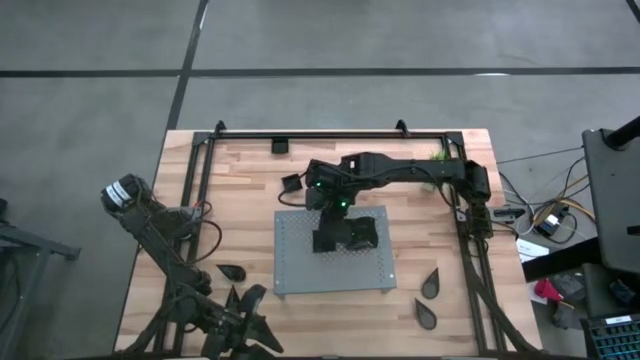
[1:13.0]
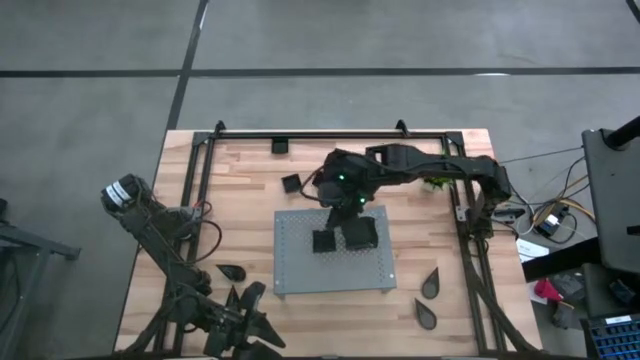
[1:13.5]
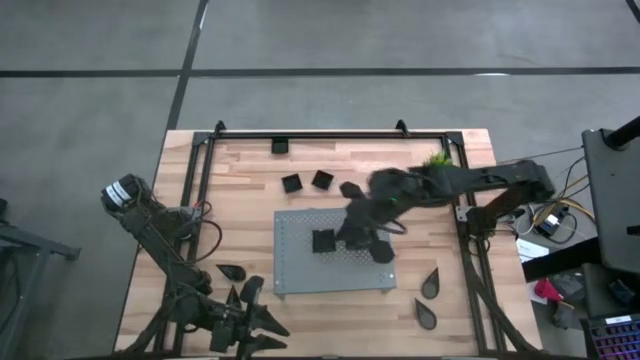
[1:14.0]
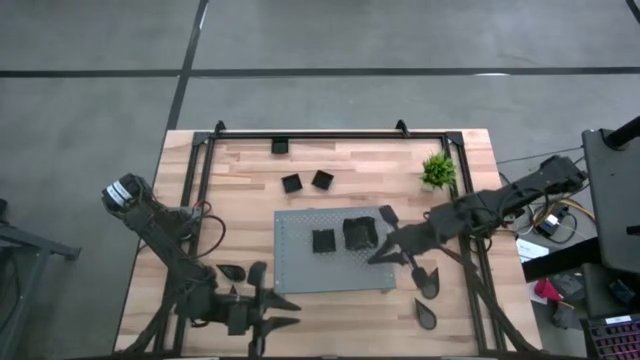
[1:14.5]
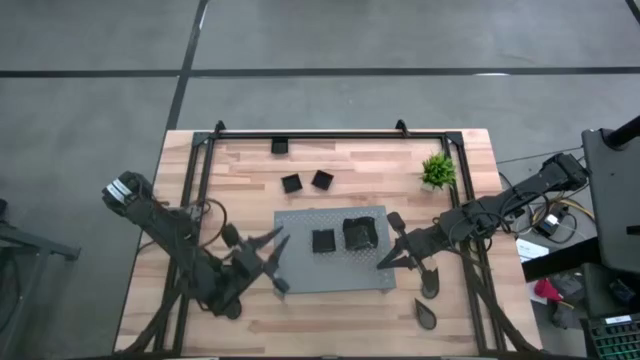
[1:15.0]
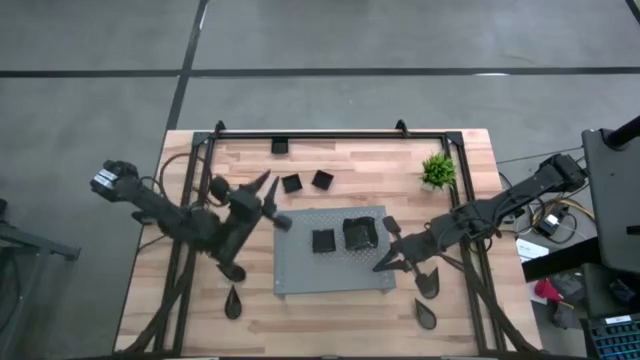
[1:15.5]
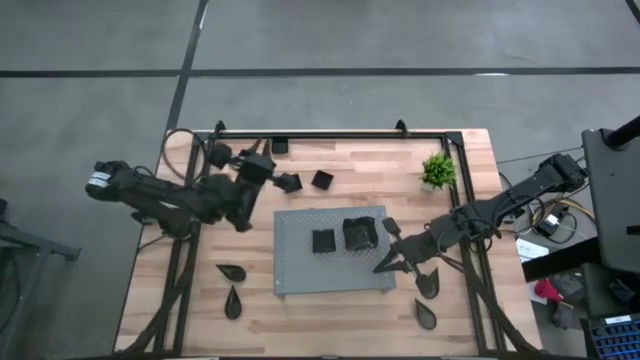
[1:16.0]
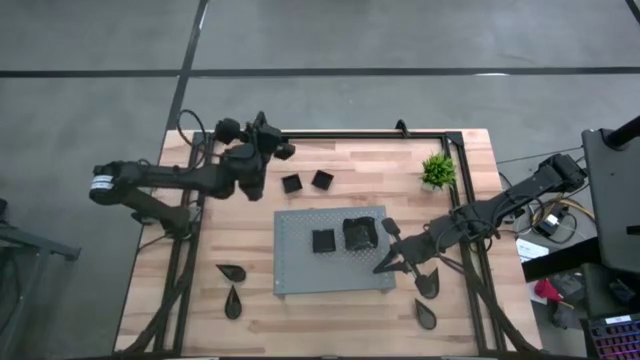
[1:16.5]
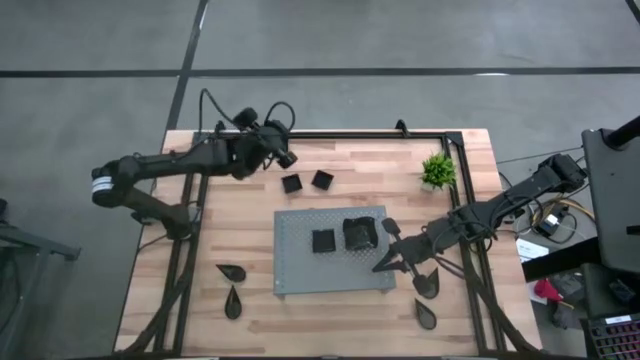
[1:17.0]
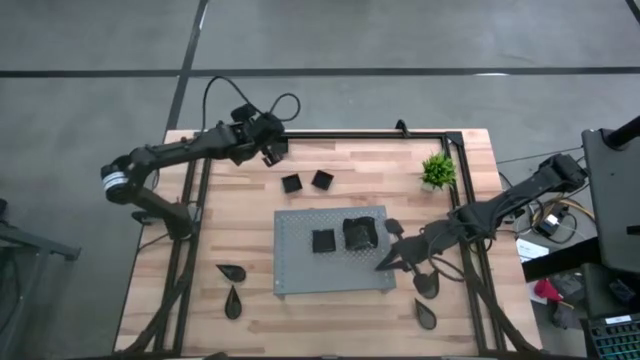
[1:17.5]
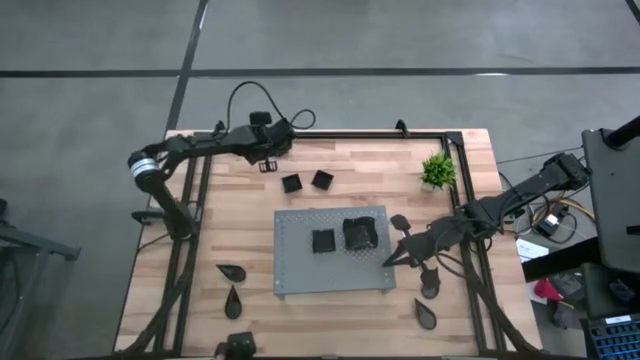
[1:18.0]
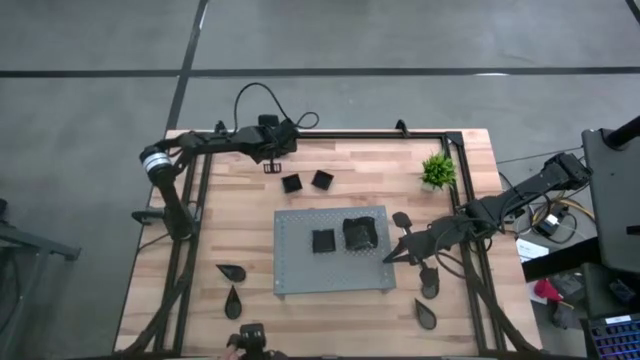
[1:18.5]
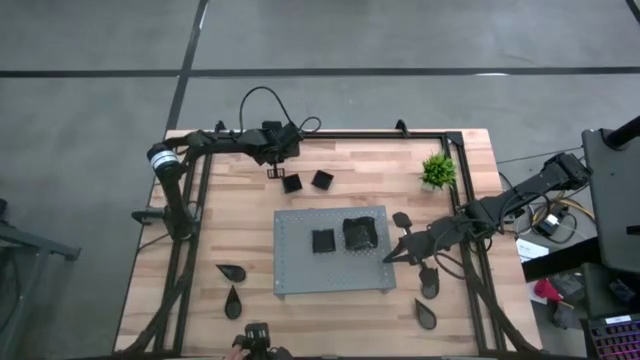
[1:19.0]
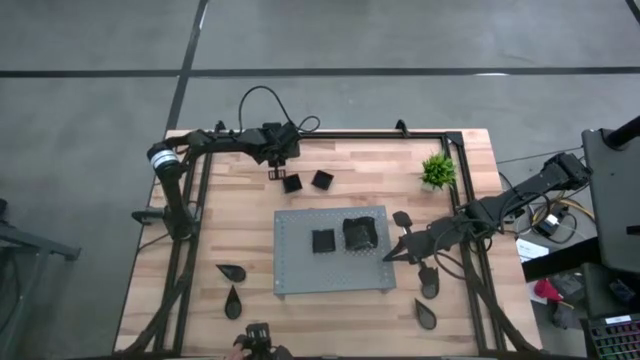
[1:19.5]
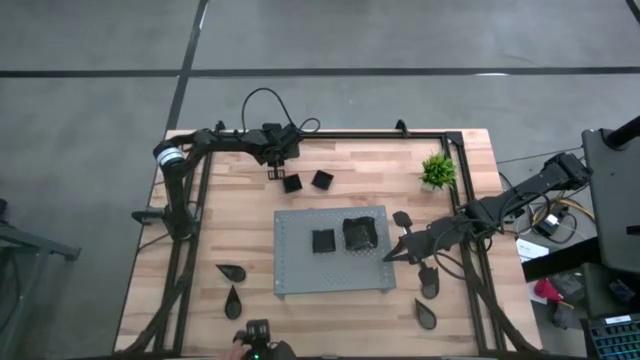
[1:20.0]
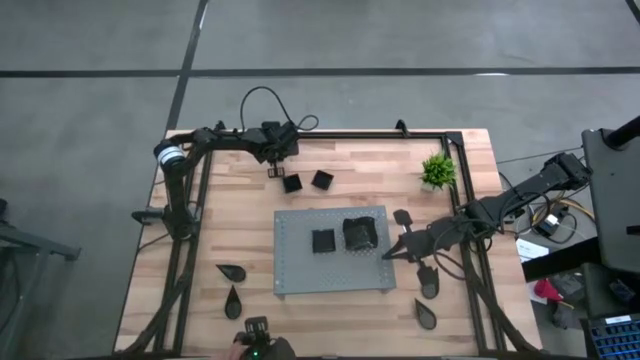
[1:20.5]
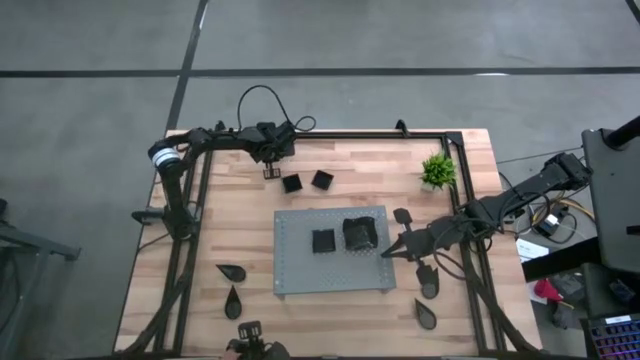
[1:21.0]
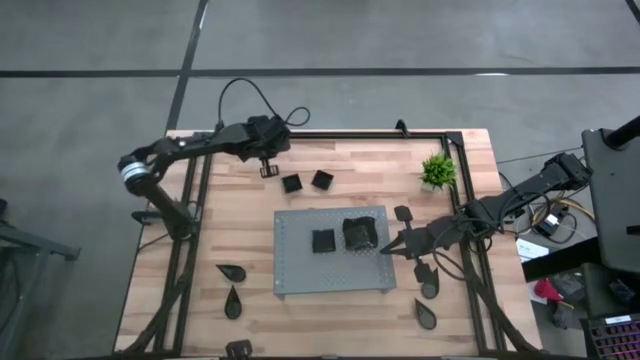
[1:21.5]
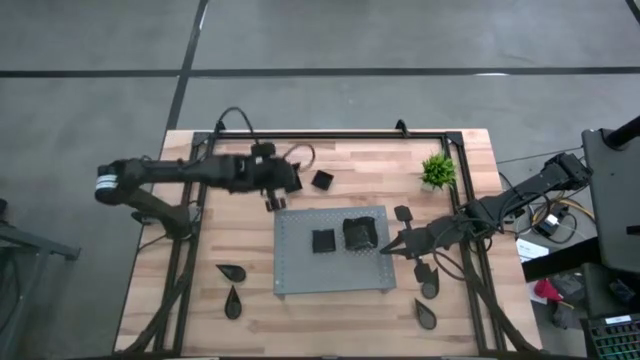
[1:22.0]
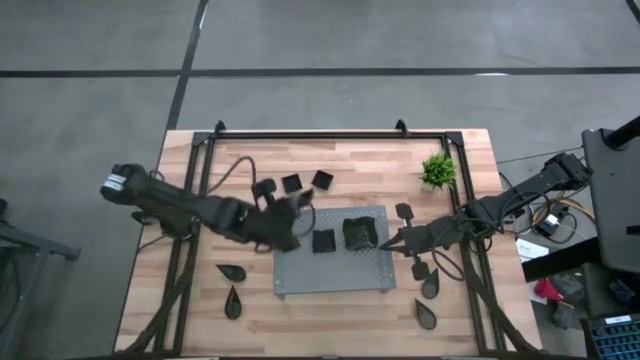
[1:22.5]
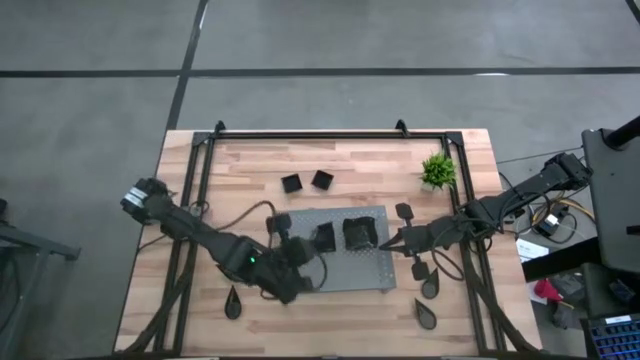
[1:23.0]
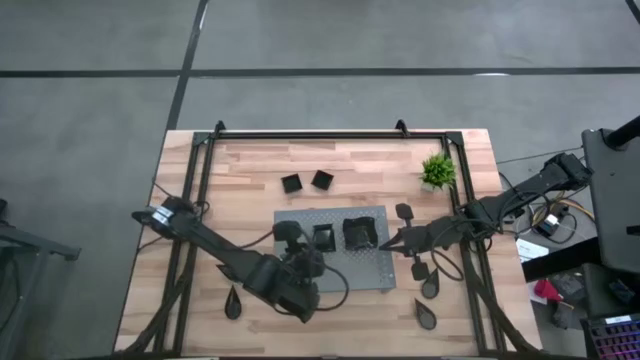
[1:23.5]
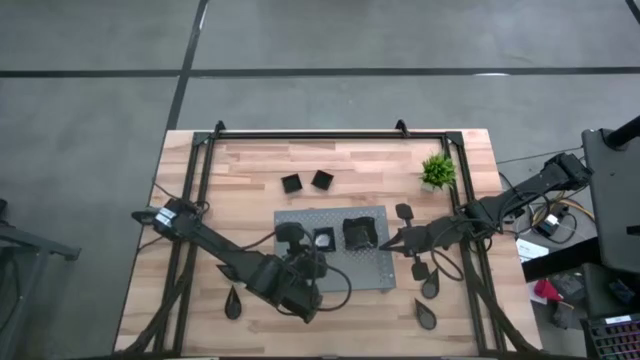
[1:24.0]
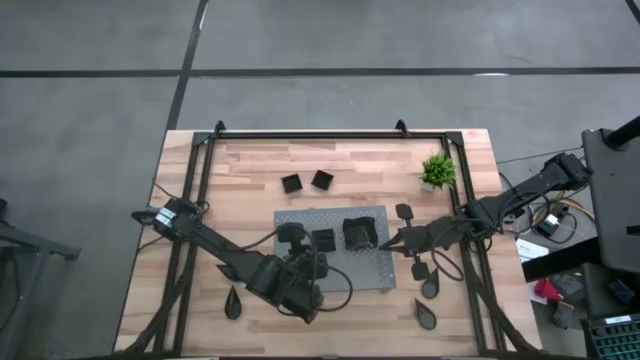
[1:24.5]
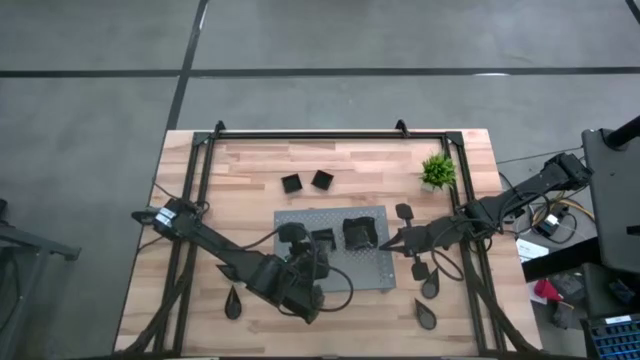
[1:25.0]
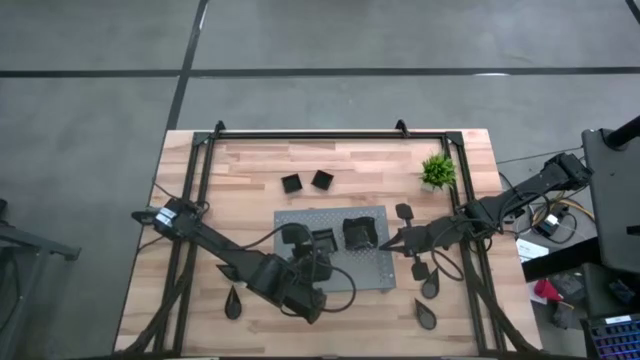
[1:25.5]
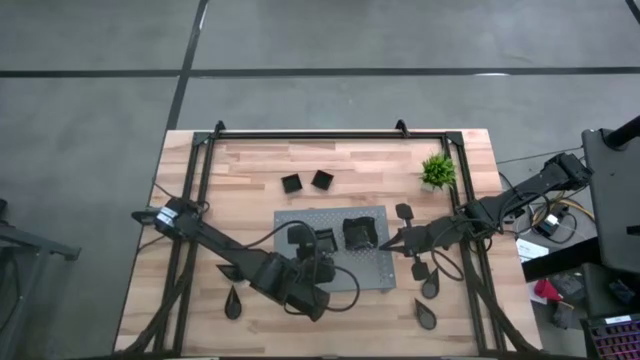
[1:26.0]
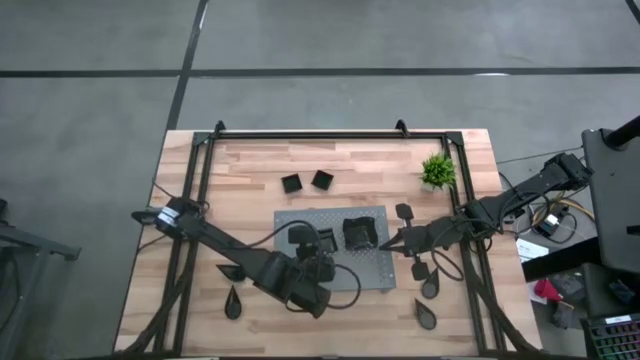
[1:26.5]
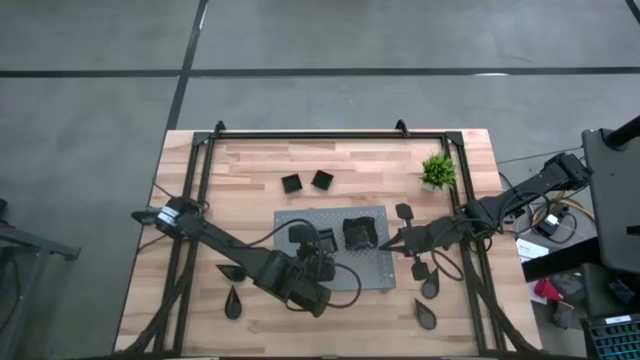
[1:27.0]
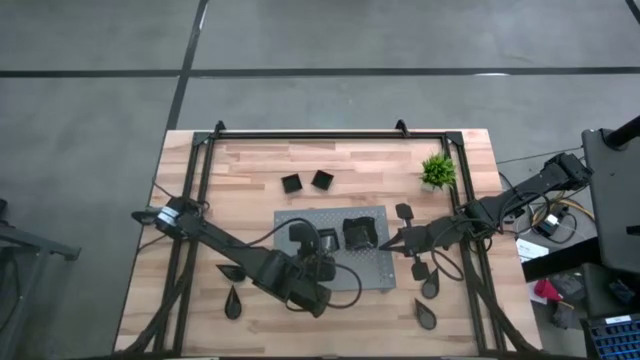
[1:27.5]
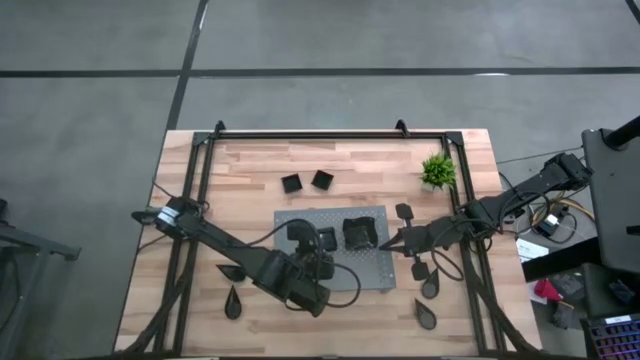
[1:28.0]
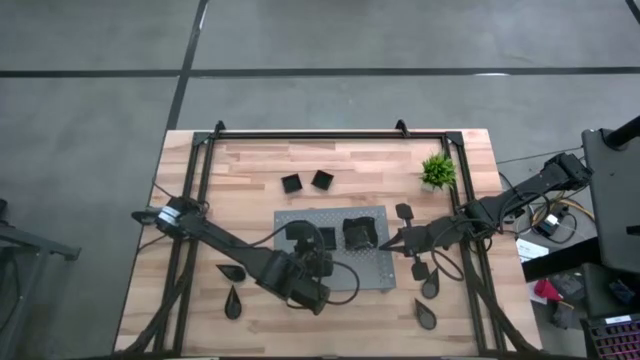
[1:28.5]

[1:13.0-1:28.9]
Task: Pick & Place Mini shaped plates
Stack the square plate on top of the square plate on the shelf

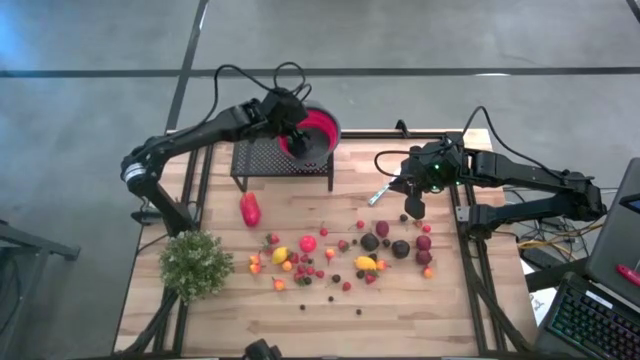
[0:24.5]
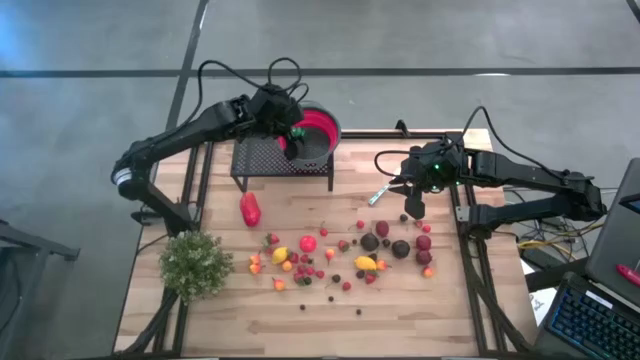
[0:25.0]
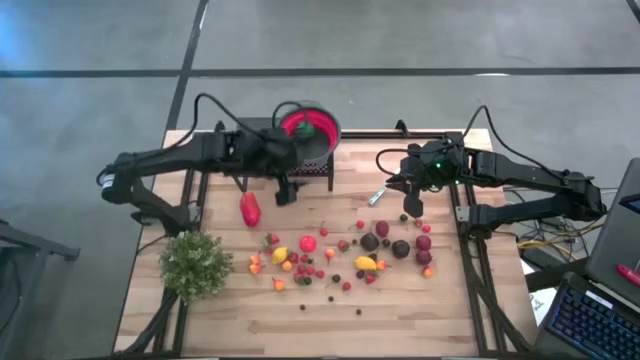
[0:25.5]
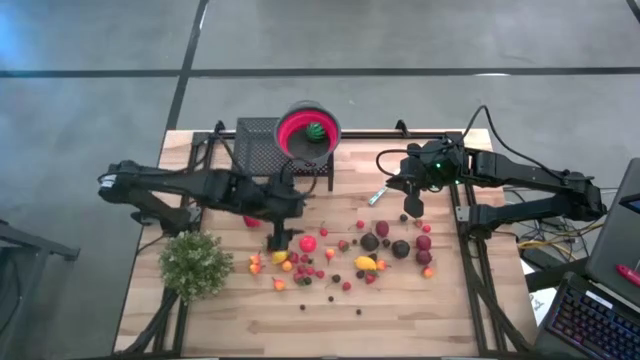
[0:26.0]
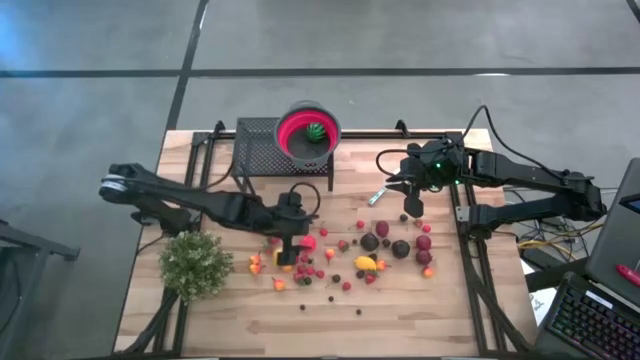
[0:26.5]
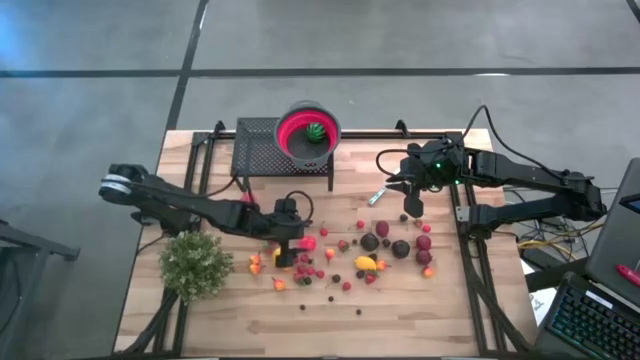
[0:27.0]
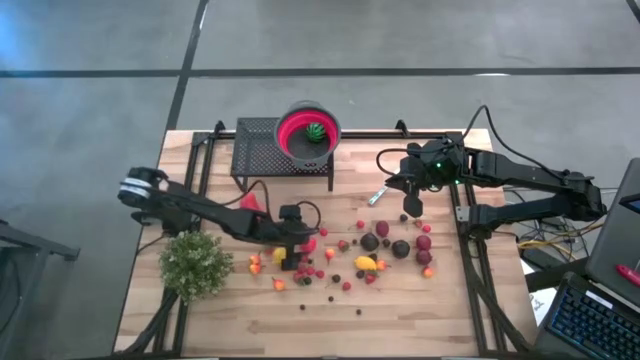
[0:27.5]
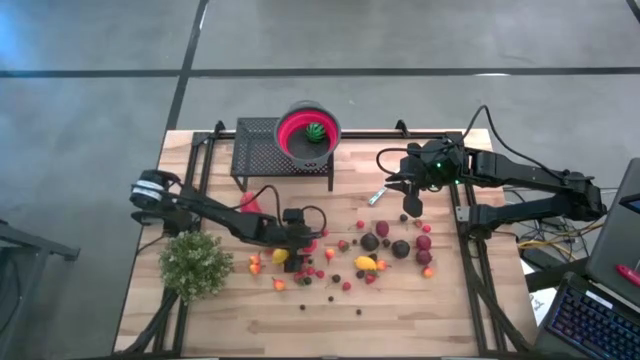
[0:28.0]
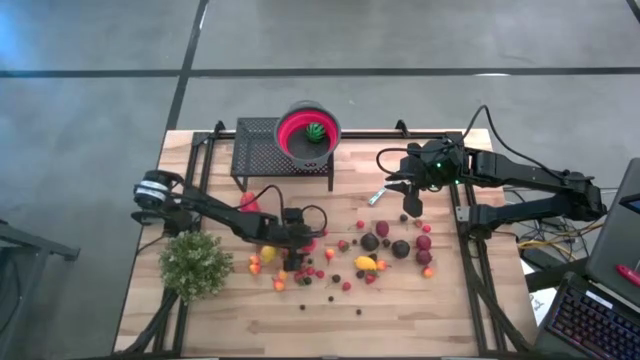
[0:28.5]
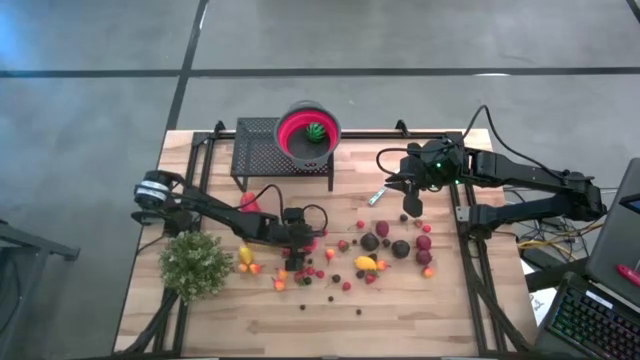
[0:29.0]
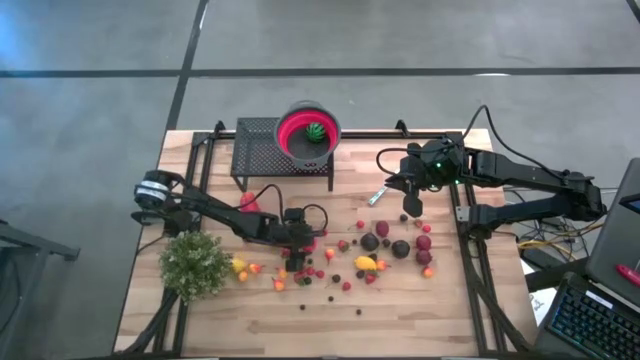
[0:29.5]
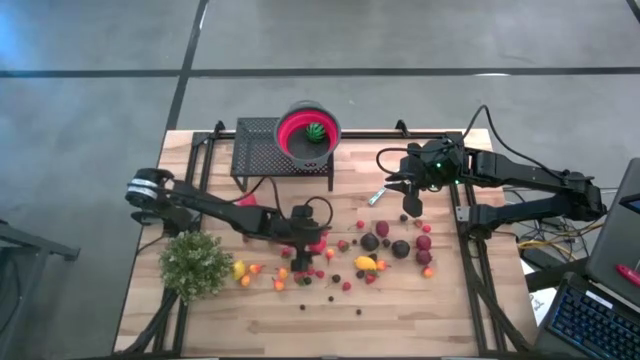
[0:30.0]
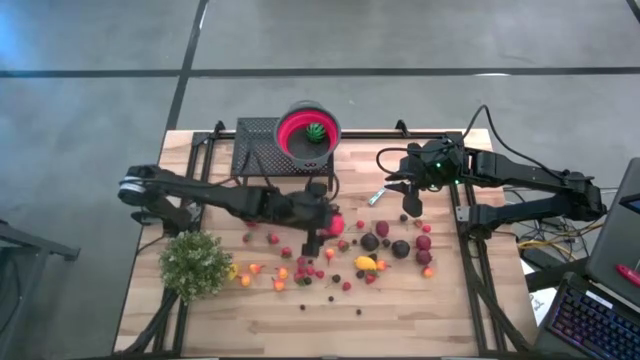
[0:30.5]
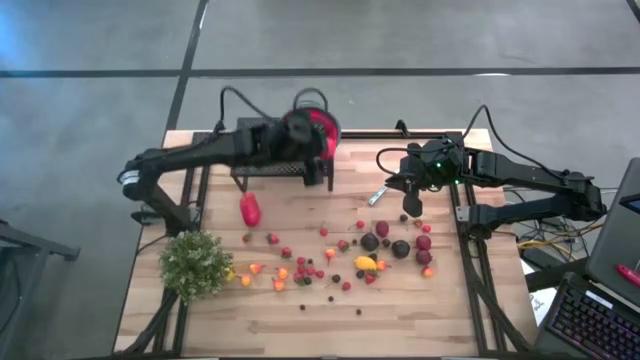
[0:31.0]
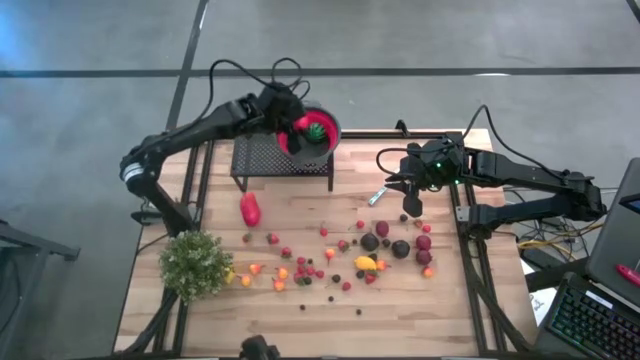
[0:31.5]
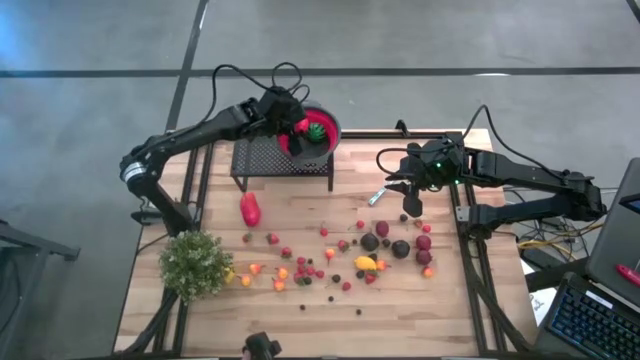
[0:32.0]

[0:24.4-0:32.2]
Task: Pick & Place Fruit
Put the red tomato into the red gray strainer bowl on the shelf
